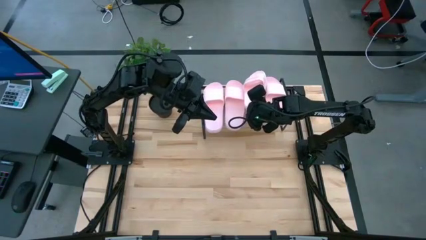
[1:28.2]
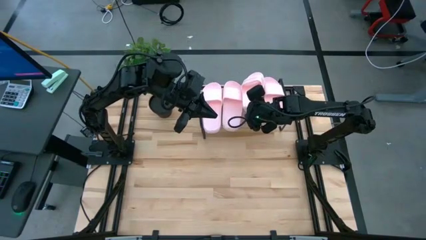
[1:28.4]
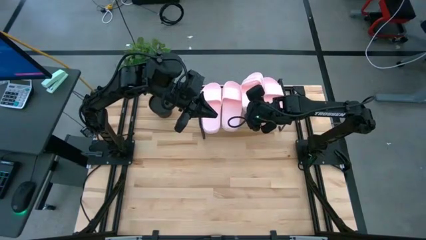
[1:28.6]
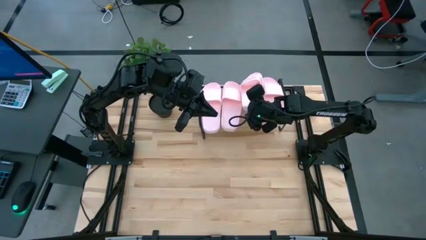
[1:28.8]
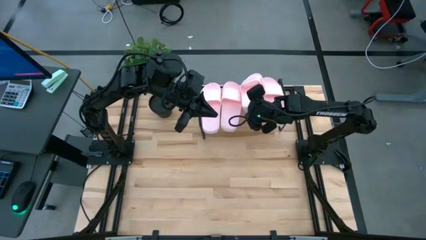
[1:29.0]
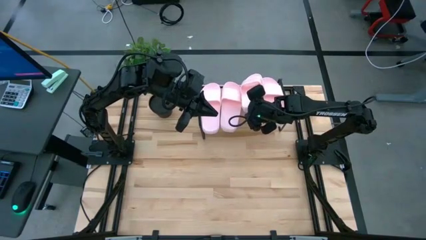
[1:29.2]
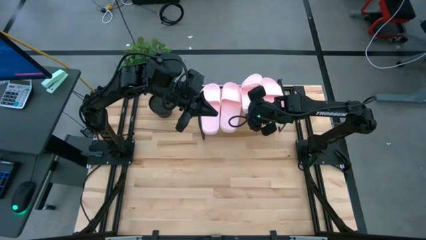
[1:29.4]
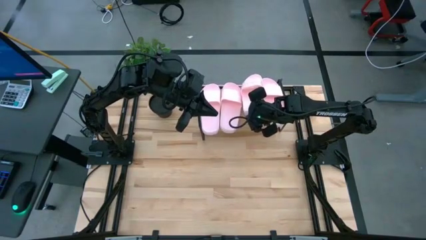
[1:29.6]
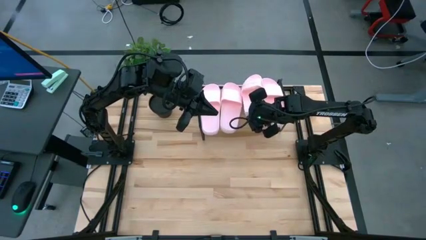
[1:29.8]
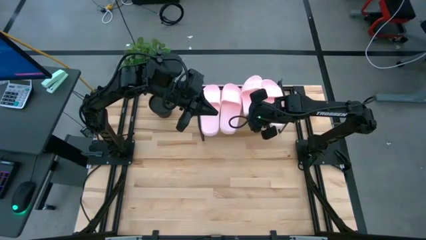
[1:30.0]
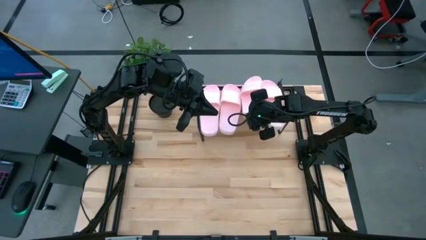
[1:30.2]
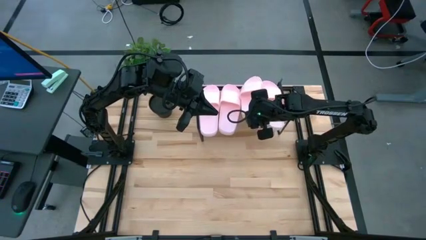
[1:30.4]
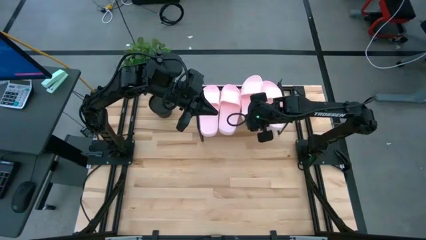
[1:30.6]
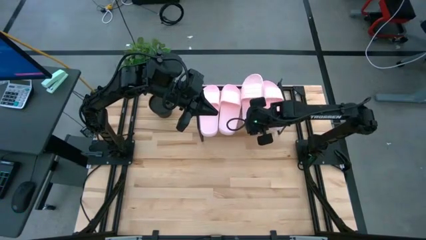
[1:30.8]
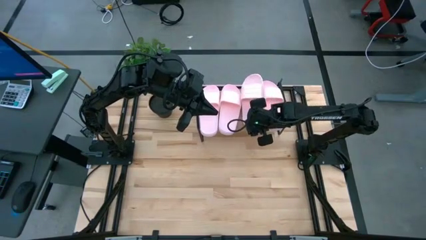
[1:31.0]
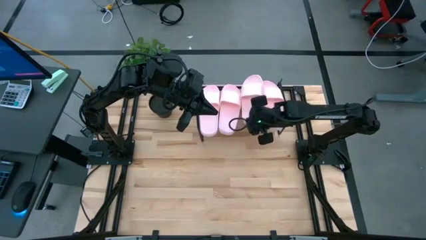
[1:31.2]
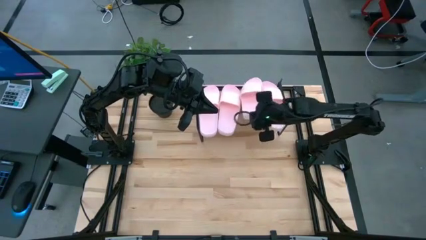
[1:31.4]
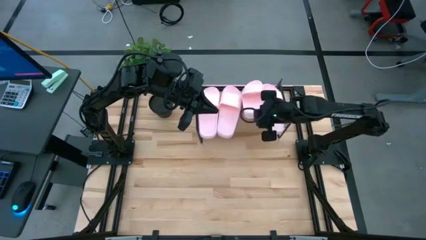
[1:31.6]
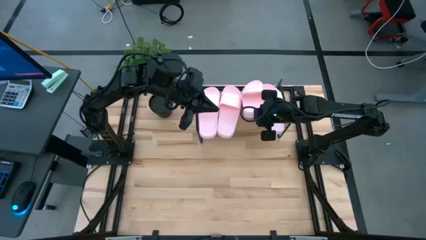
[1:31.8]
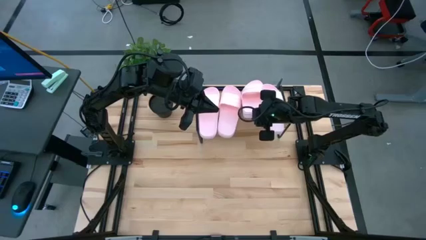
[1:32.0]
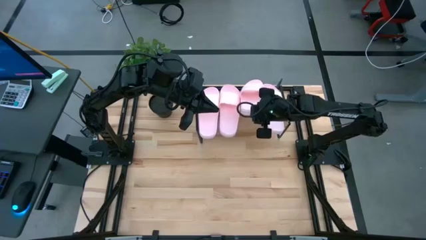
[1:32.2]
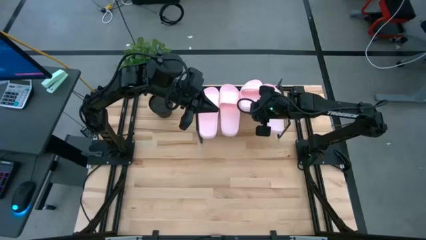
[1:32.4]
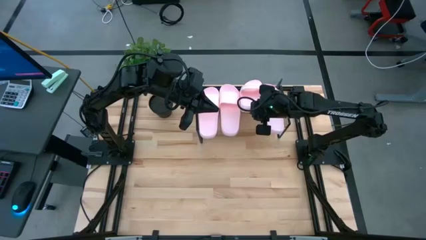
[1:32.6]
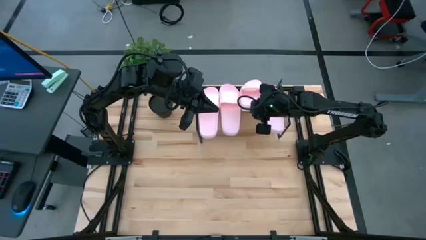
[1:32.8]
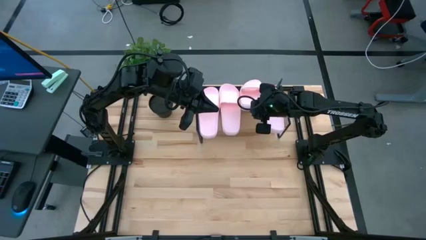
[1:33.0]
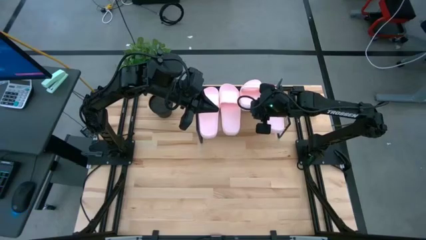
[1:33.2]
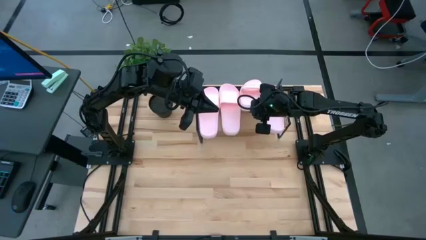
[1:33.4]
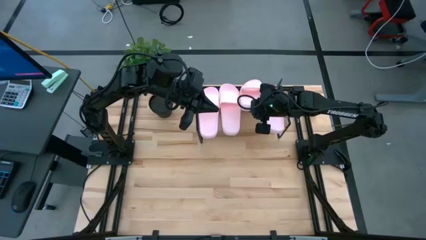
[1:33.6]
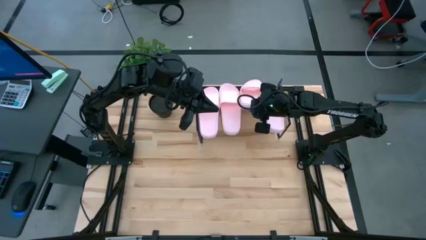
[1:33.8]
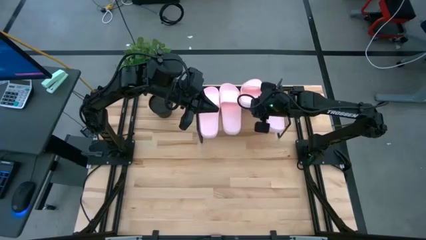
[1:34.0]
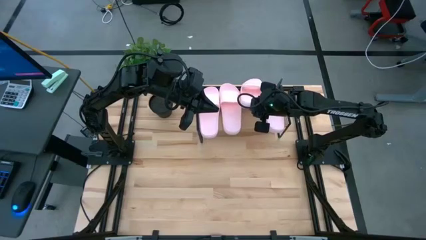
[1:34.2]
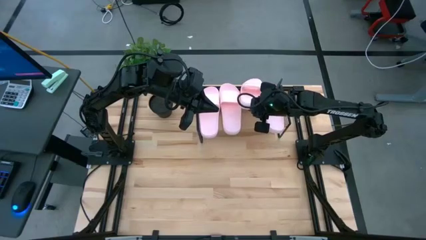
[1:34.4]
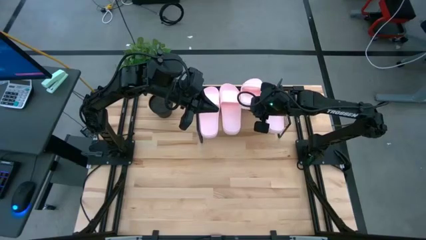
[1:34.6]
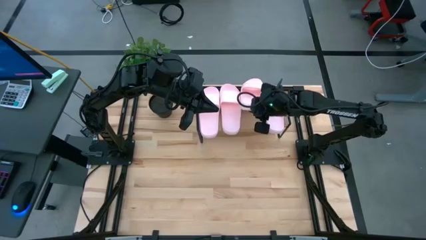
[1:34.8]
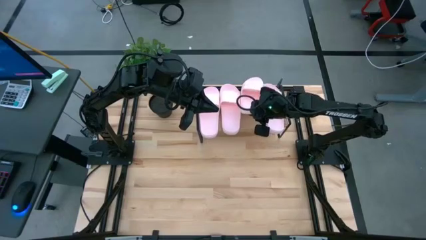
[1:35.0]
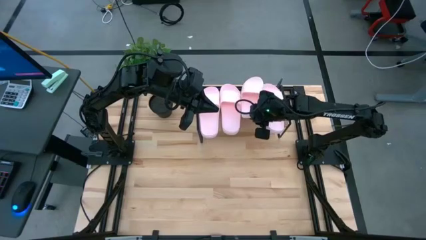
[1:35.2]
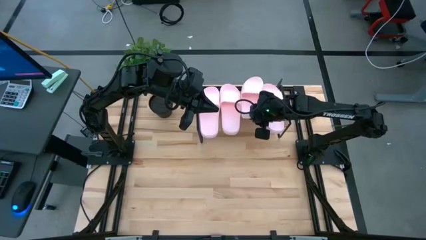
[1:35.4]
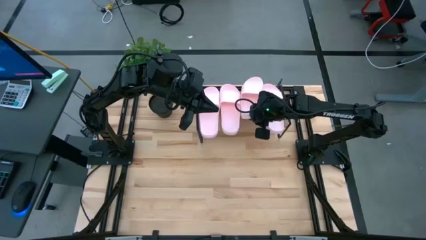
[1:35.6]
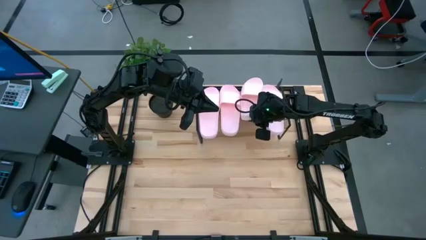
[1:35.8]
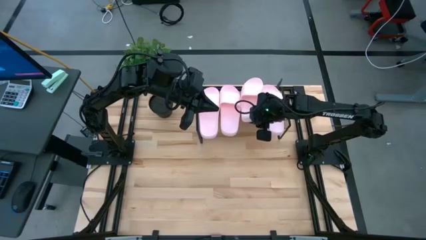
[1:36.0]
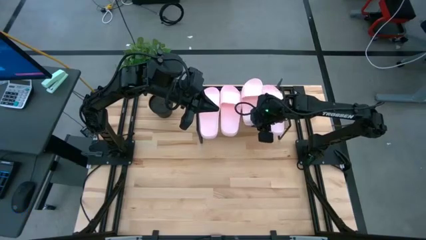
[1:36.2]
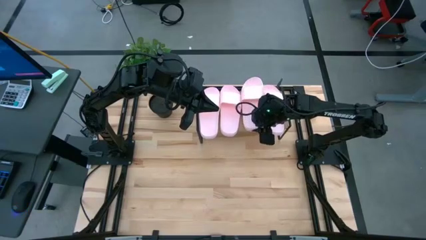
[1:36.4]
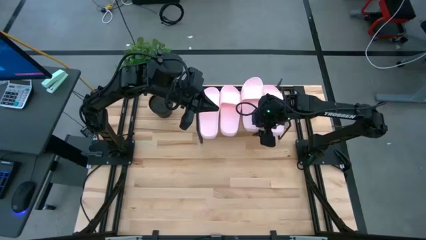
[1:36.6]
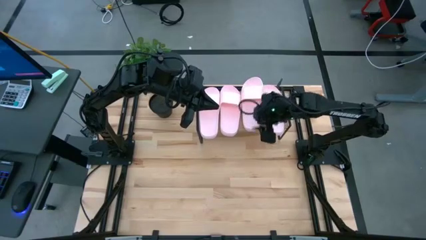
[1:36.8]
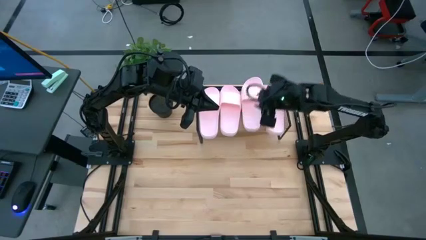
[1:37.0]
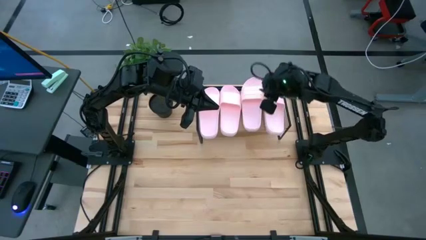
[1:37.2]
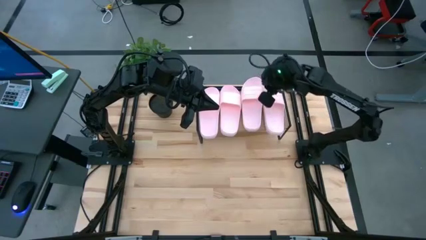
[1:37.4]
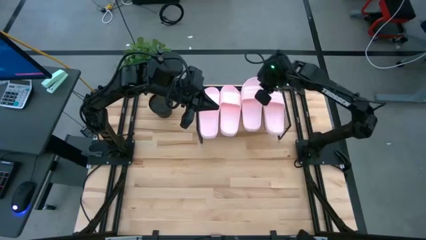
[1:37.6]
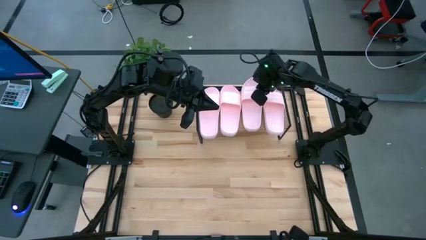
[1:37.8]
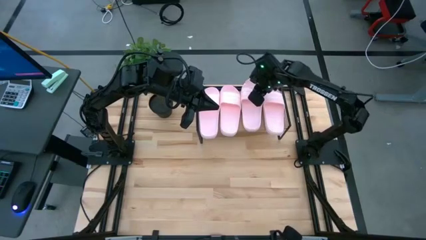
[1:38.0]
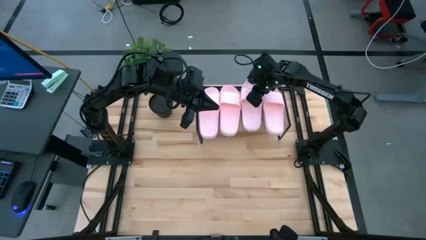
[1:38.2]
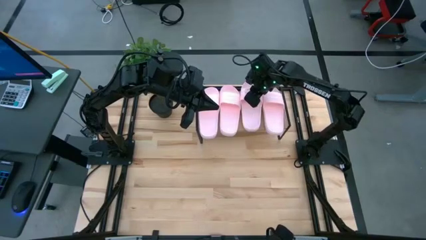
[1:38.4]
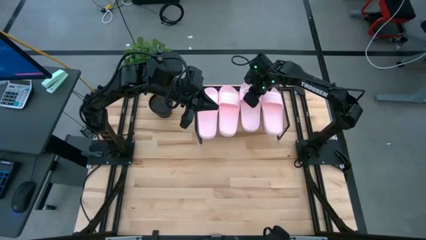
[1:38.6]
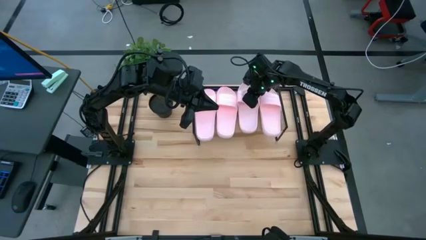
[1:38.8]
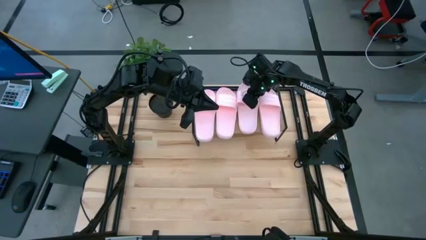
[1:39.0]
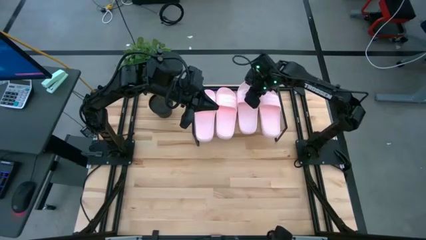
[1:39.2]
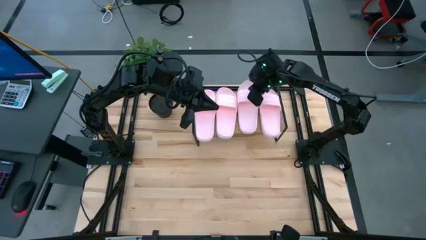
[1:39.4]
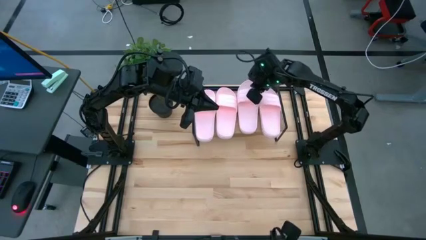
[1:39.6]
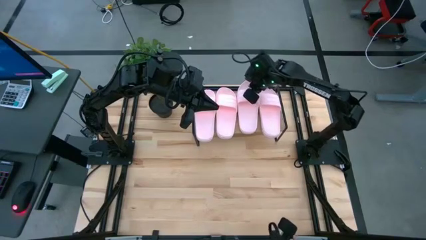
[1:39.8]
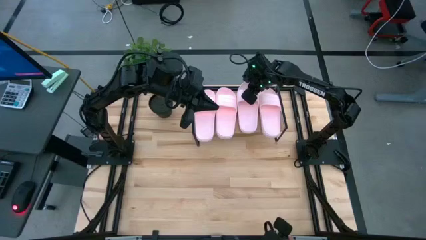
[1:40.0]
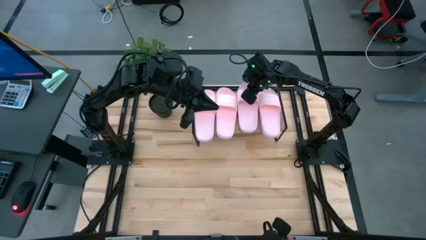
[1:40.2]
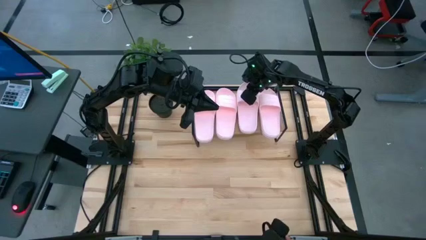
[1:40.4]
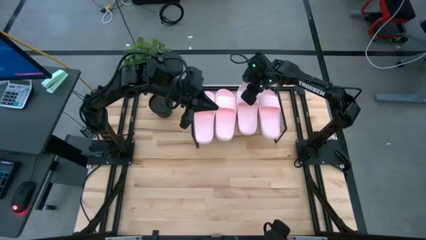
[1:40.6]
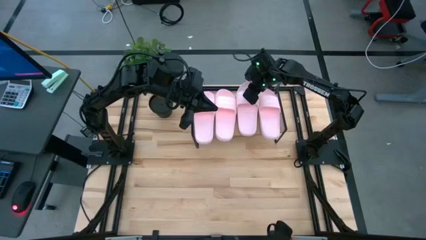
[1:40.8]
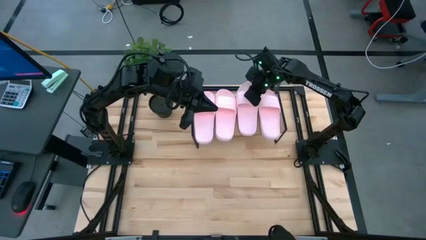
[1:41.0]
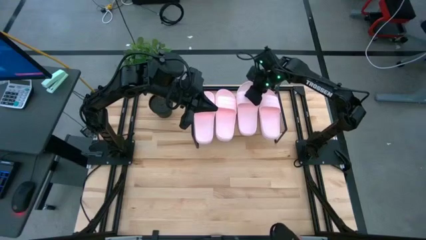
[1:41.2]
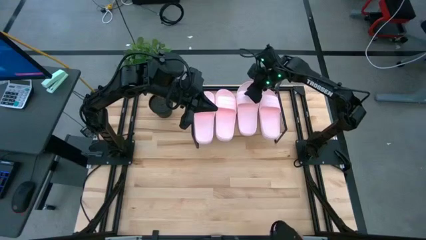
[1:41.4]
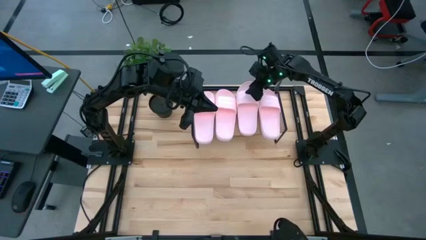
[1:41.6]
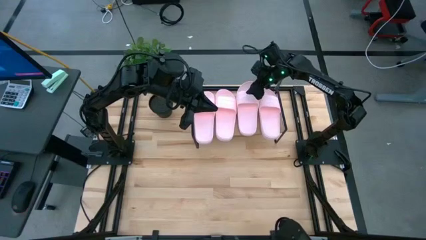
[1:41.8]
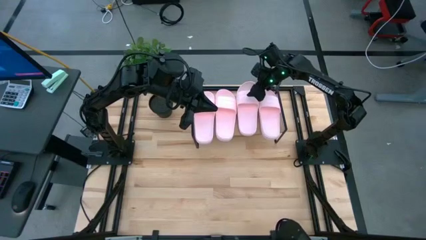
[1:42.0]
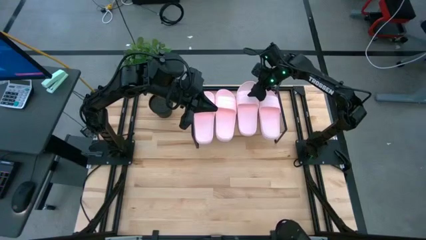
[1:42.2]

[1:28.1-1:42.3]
Task: Pick and place slides into the shelf
Put the pink slide on the shelf
